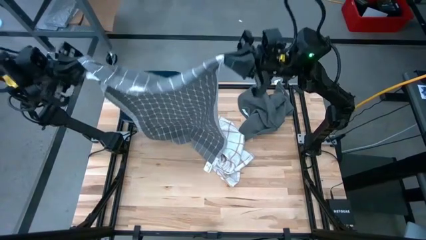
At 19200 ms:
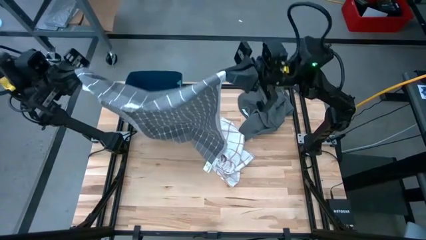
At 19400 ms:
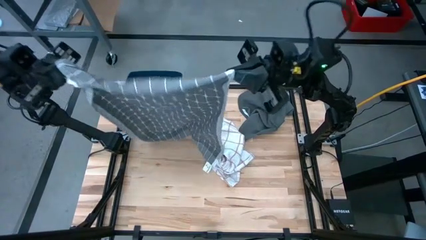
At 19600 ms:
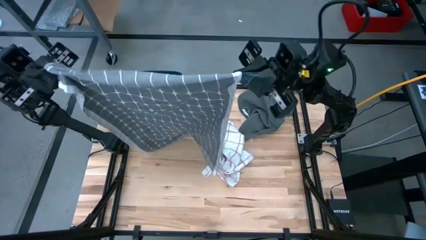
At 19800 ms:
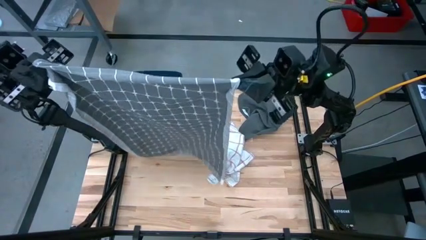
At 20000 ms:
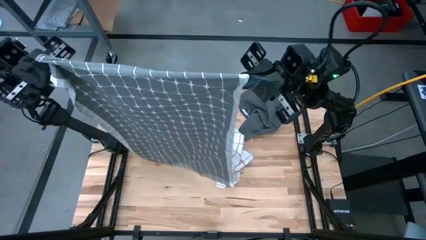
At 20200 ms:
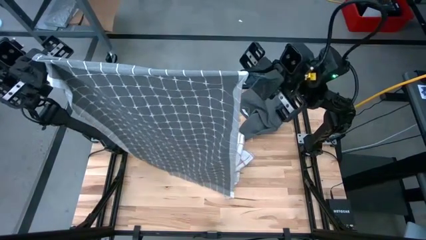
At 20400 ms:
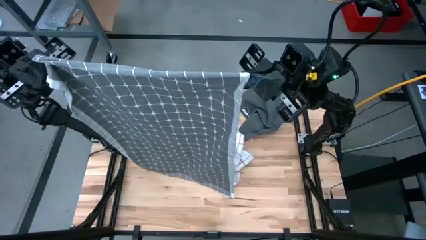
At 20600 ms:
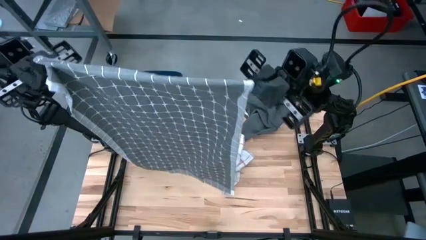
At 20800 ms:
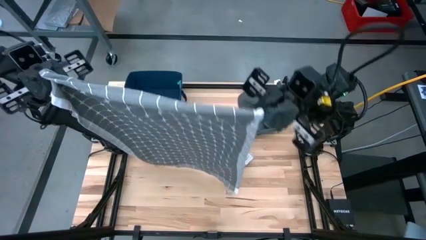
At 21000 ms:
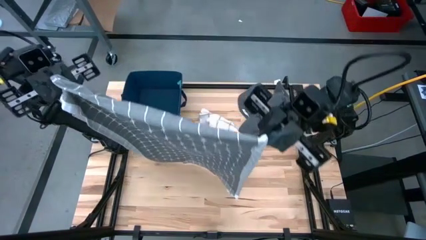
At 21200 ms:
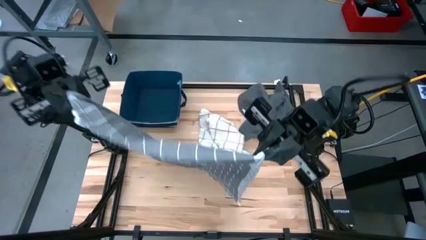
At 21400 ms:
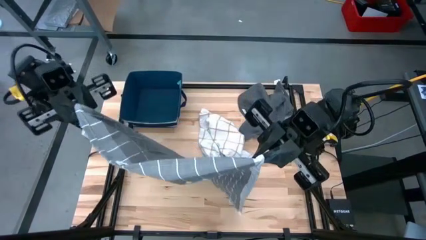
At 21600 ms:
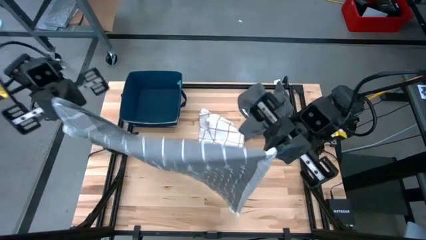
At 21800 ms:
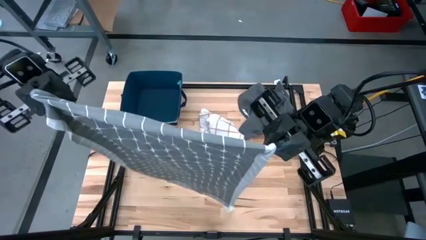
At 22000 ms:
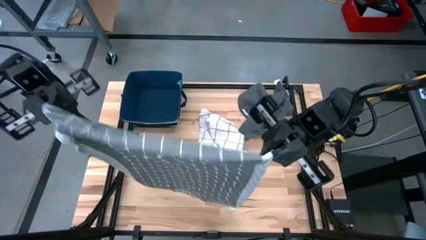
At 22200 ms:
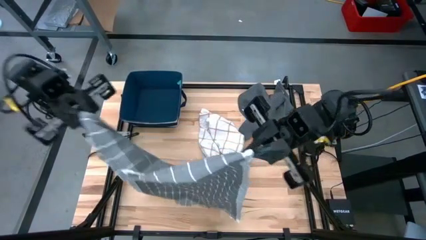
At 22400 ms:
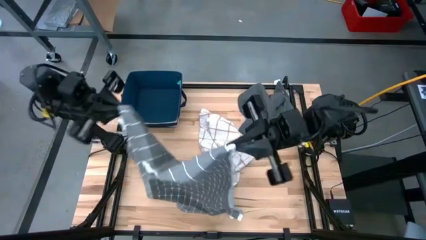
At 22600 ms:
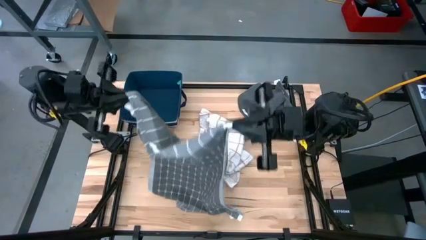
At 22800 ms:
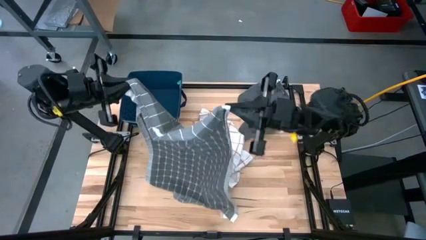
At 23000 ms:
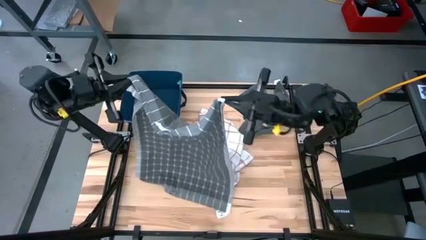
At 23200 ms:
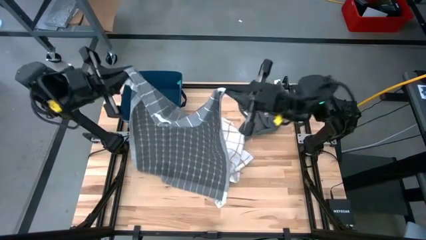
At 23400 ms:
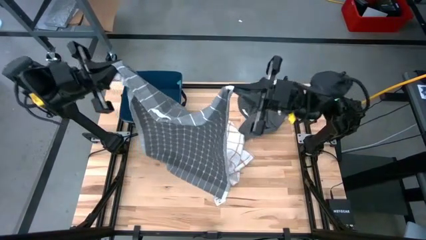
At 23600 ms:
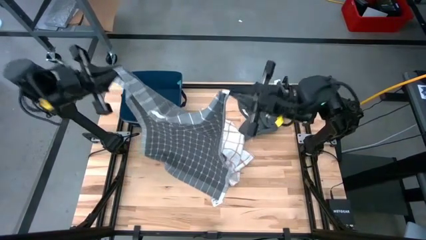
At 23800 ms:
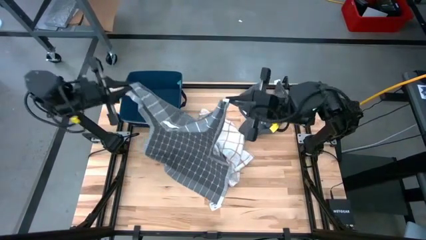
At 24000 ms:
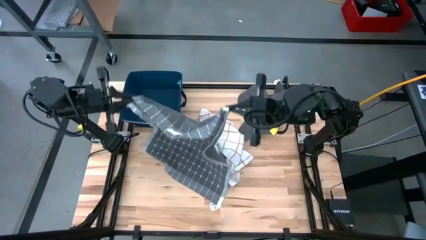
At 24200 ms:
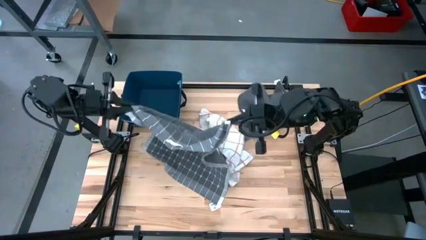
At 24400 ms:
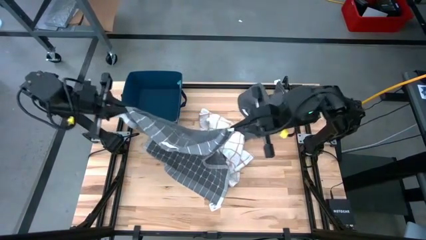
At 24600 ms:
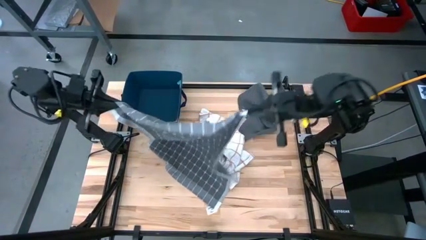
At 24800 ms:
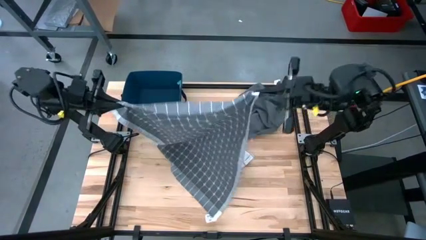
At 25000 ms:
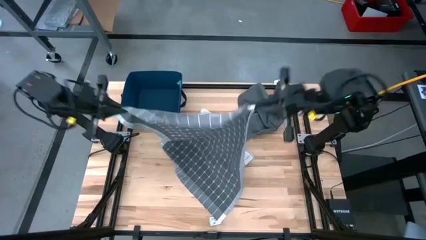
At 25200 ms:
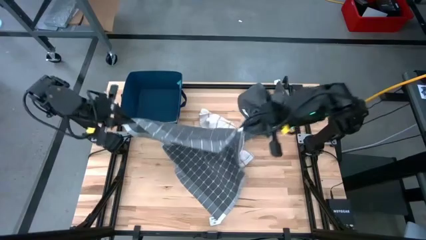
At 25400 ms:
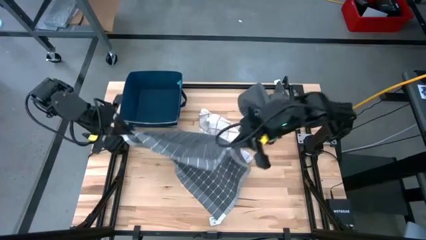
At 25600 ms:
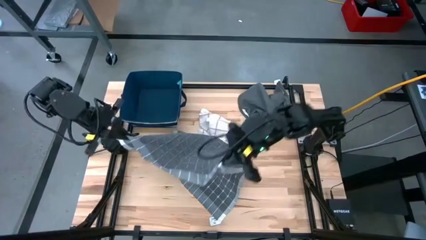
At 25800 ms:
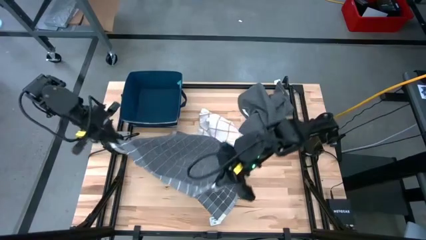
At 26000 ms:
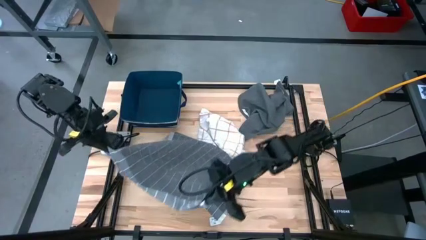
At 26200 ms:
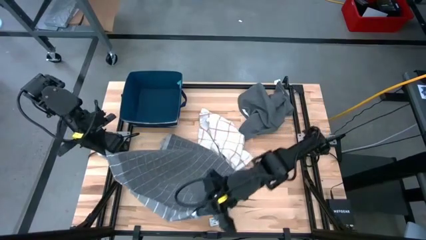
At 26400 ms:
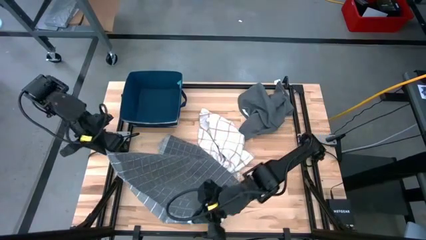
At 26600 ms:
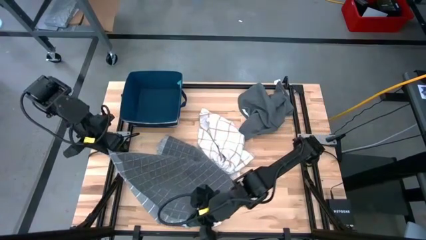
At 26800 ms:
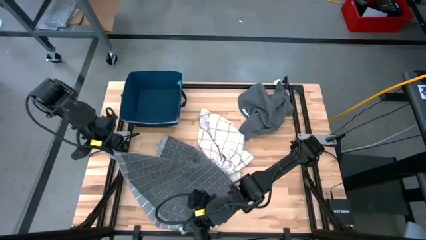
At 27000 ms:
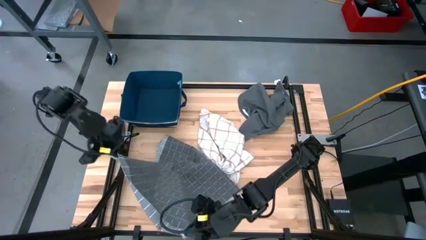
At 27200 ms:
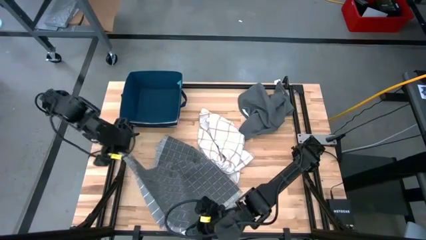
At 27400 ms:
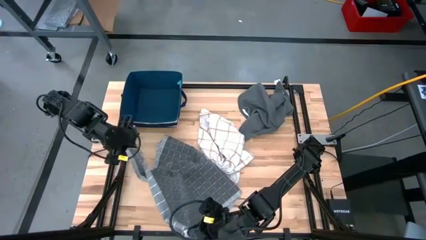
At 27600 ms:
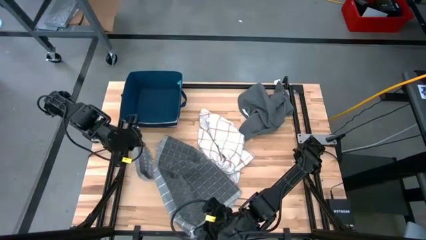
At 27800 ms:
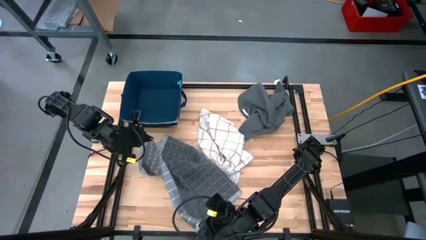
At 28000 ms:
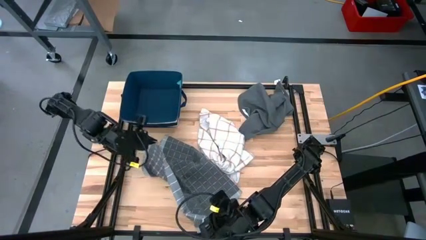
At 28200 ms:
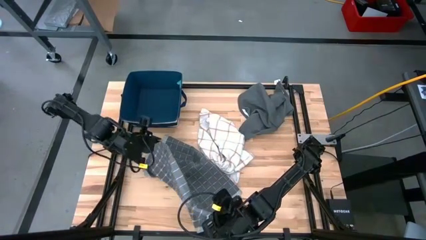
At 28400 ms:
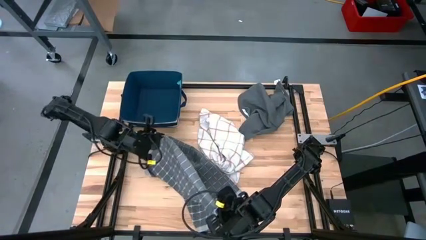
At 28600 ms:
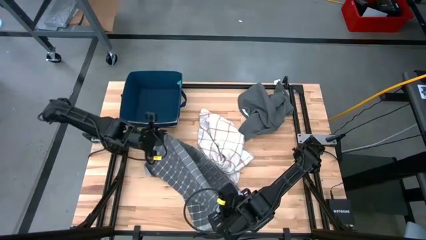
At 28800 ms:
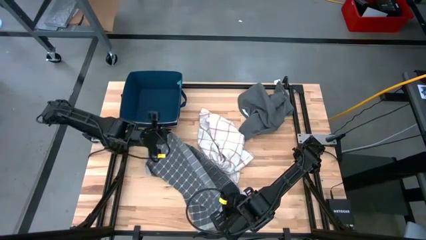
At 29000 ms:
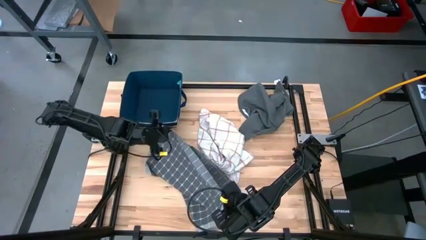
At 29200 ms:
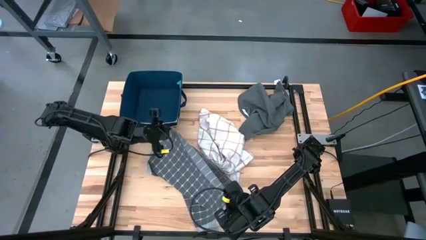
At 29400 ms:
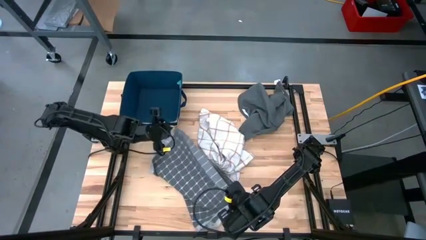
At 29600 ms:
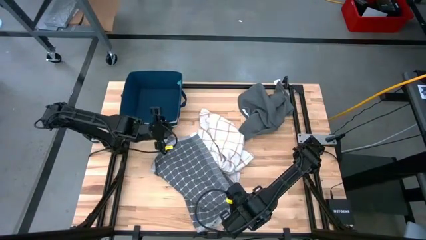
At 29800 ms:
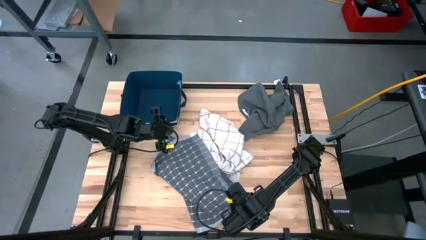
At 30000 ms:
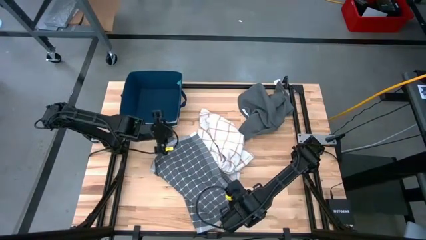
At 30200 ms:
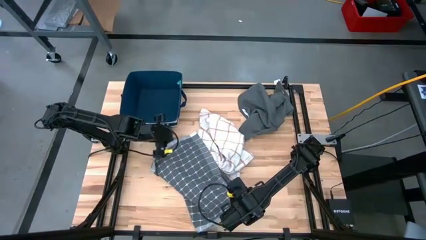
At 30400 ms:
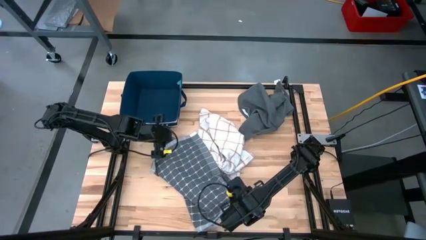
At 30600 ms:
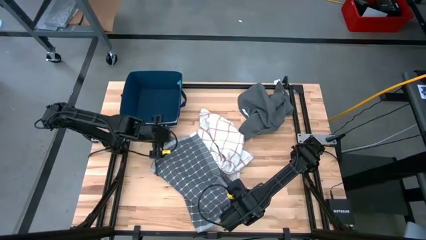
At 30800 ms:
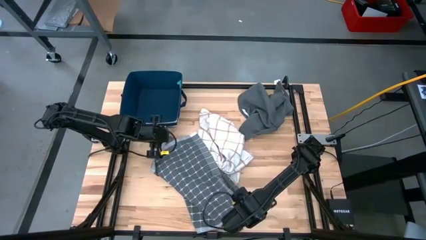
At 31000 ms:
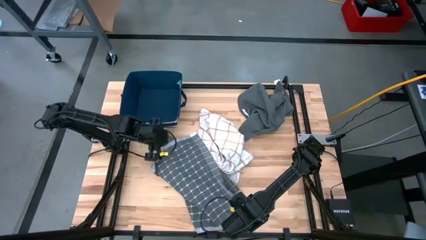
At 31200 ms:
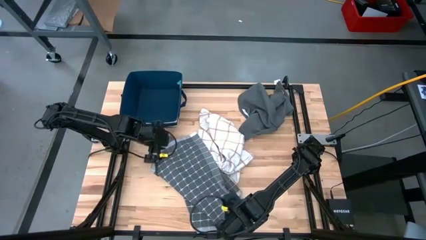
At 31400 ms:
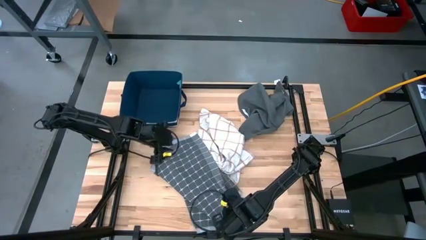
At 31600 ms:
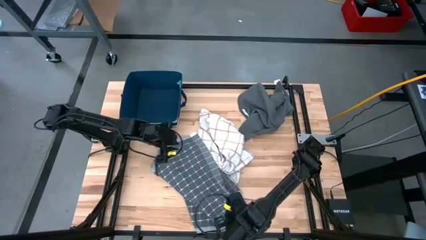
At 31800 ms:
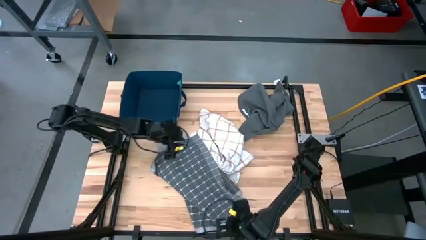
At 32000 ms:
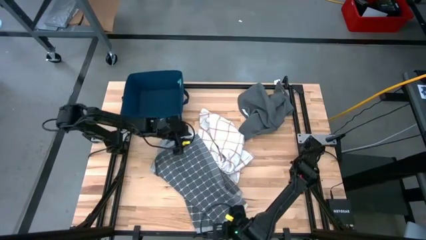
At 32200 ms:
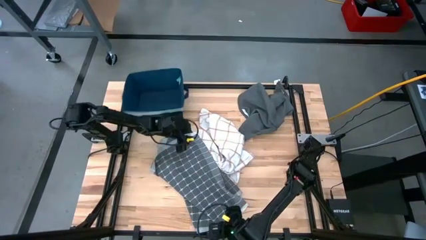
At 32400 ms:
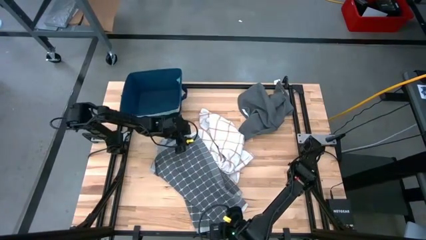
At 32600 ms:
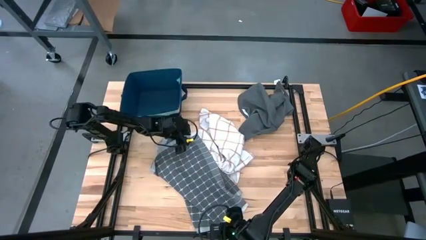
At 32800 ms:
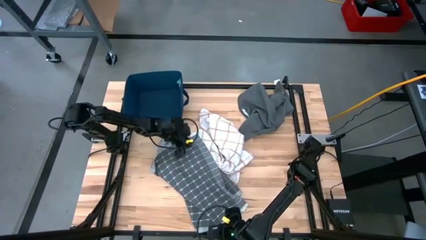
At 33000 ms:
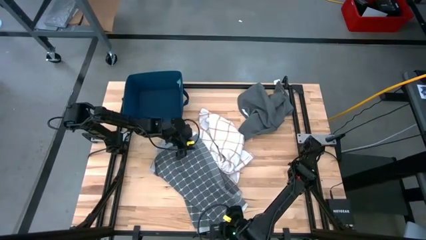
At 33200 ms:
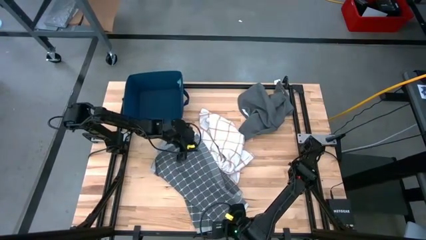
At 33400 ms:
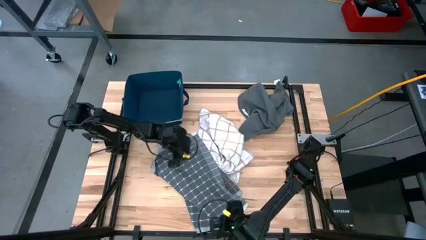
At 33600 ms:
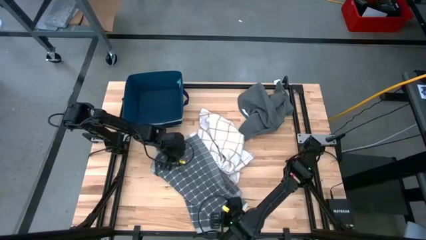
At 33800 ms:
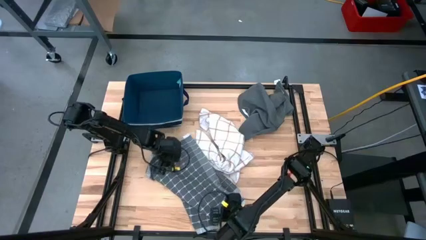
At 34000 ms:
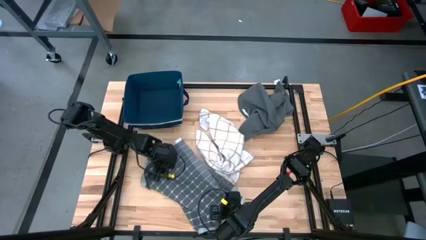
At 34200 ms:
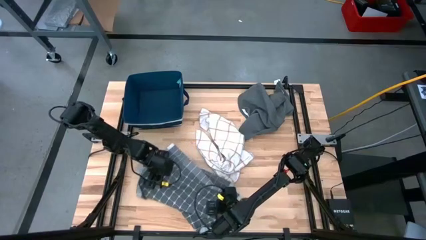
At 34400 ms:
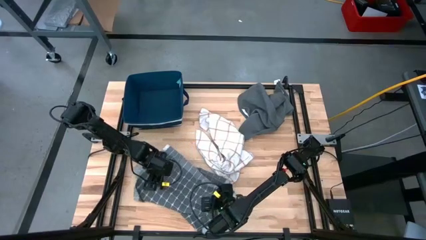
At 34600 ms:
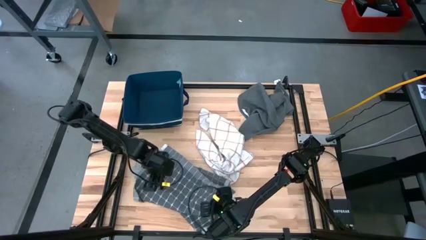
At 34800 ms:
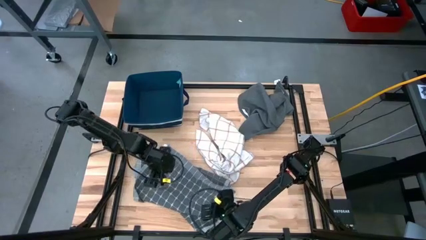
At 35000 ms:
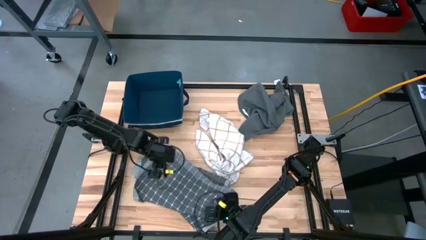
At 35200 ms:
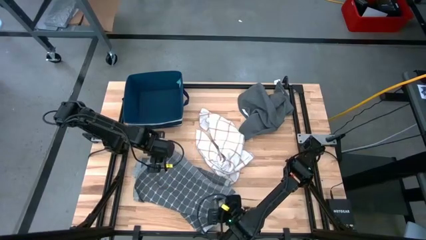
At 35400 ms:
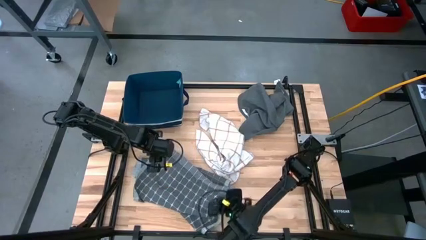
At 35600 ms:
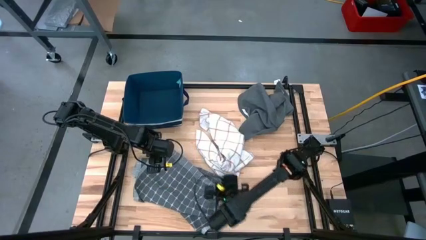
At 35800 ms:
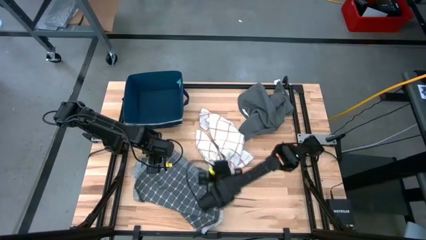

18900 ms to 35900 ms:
Task: Fold towel
Fold the gray patterned towel
